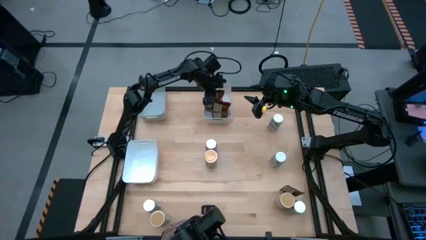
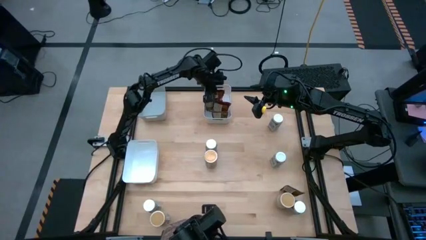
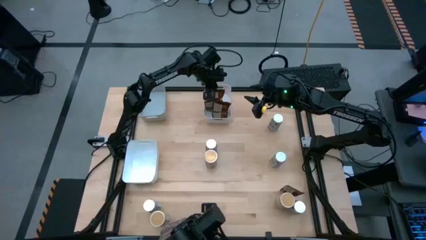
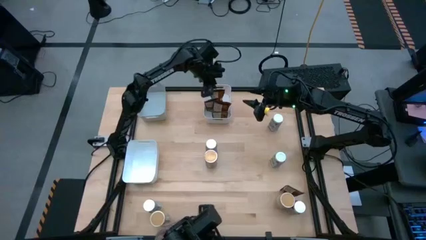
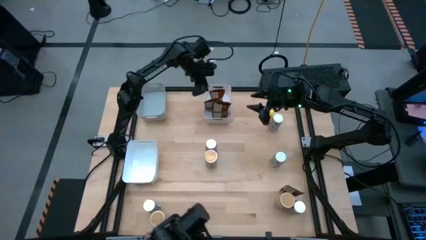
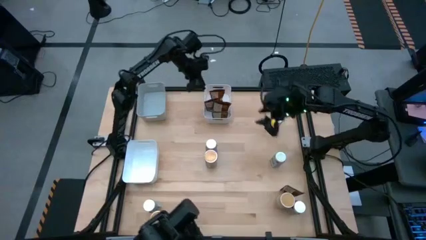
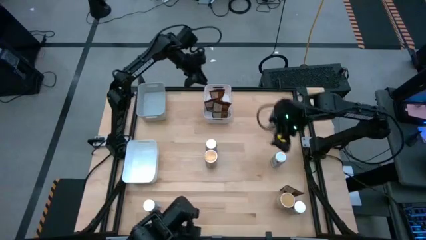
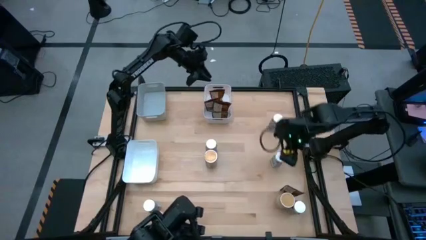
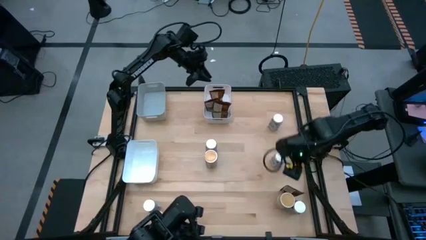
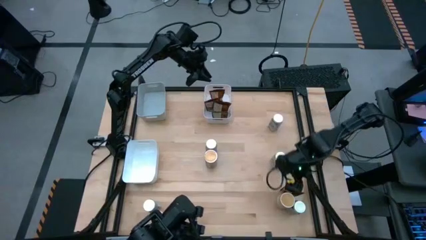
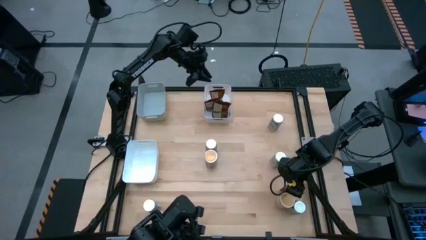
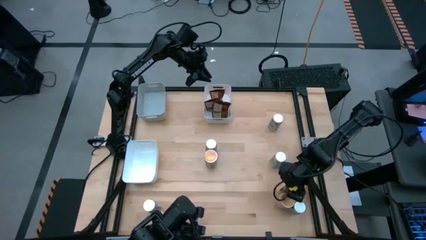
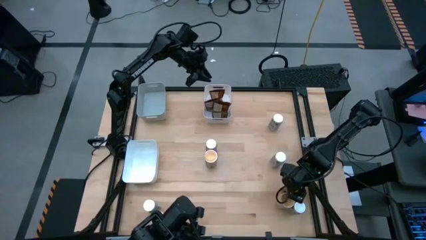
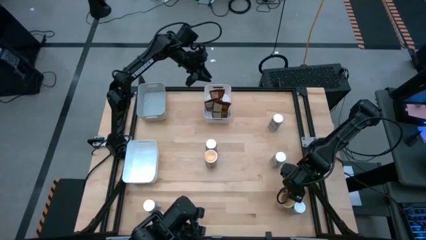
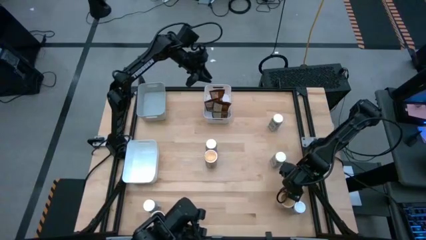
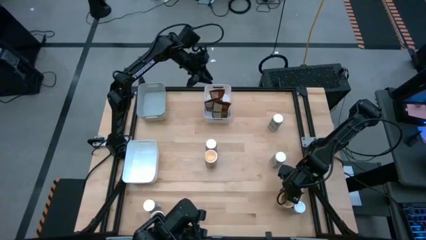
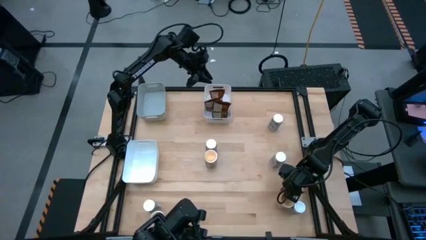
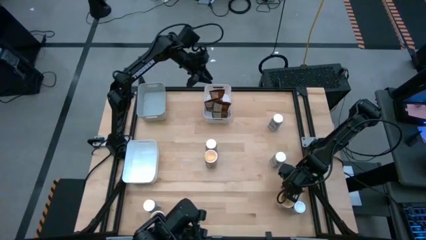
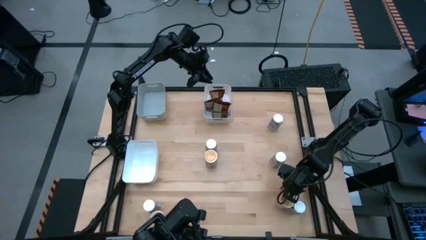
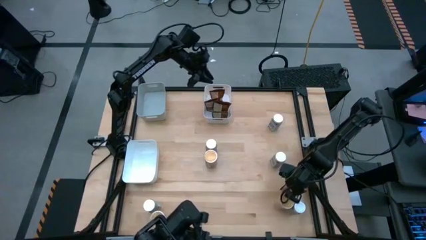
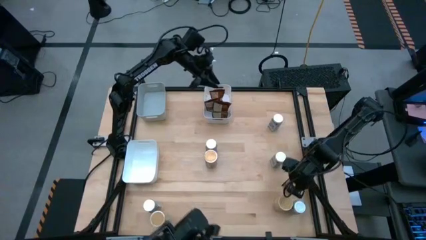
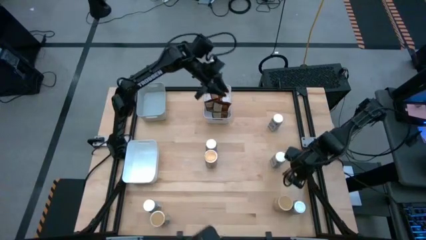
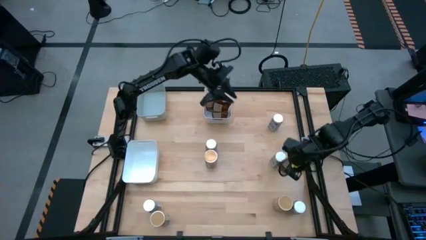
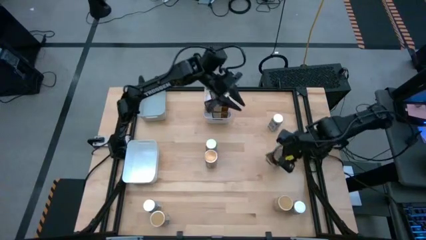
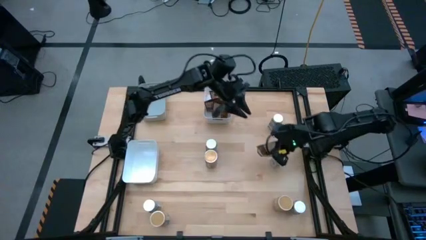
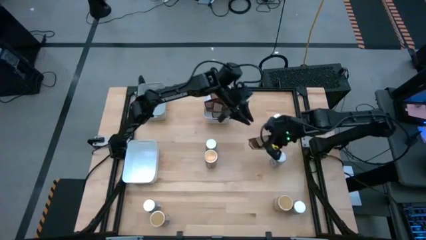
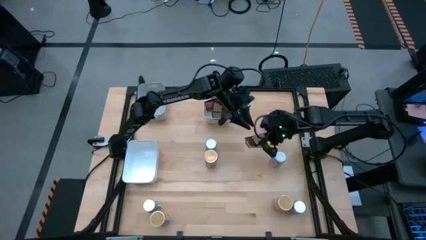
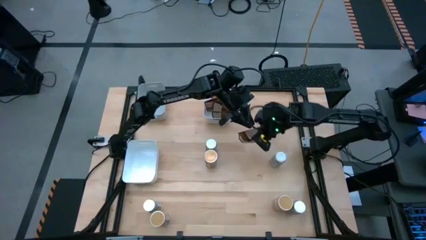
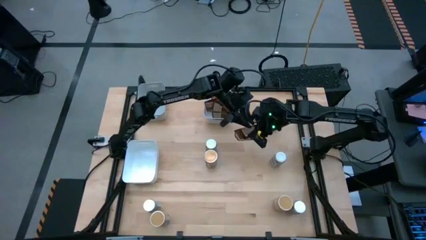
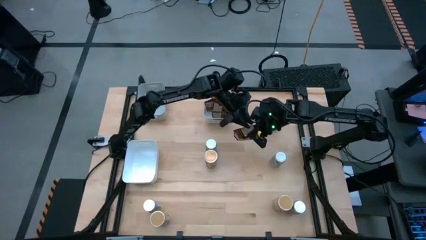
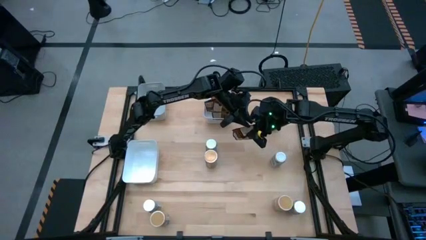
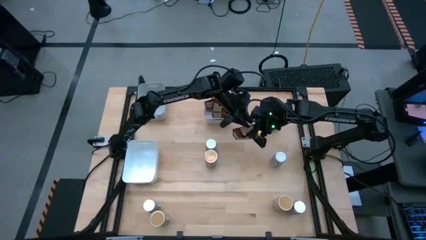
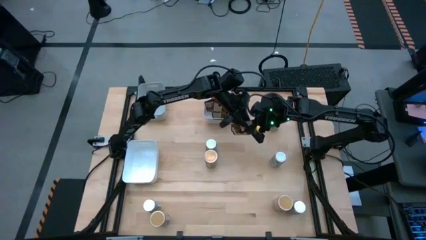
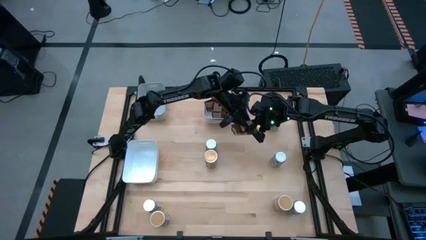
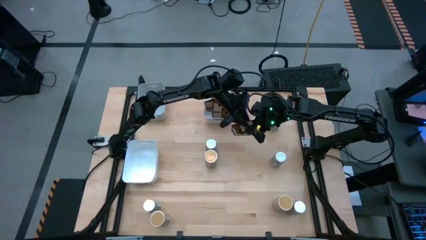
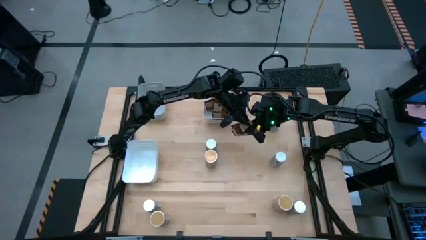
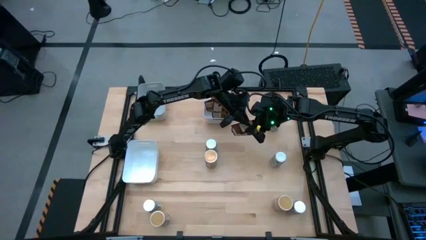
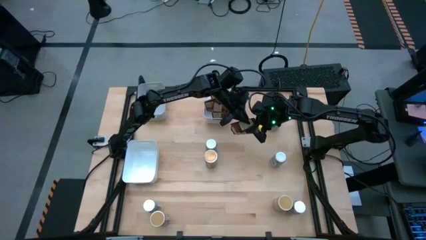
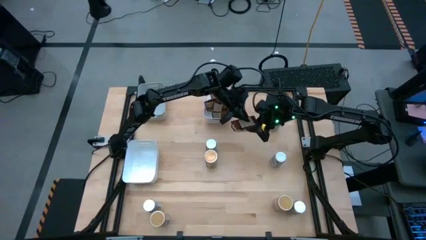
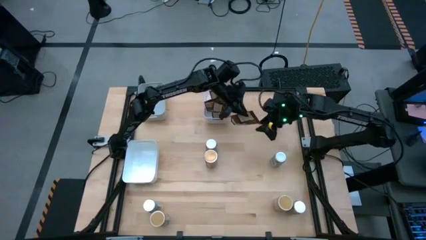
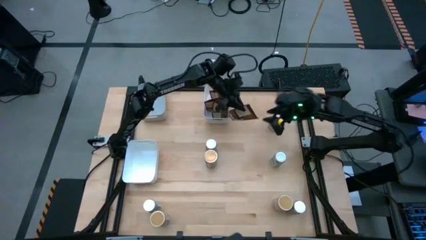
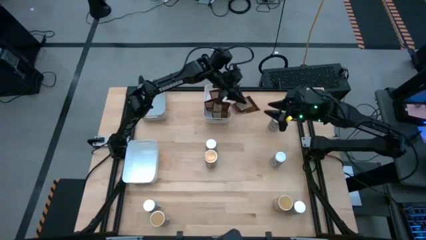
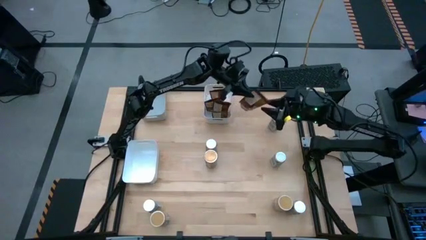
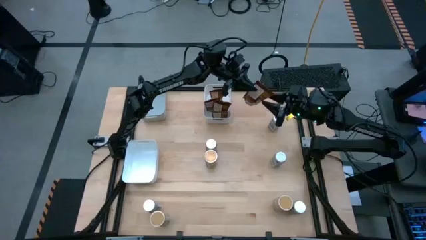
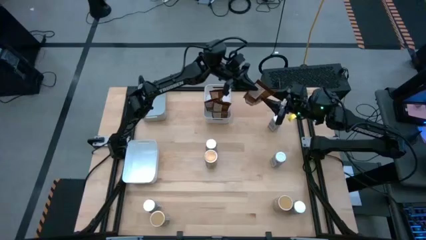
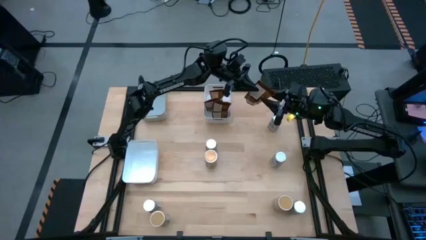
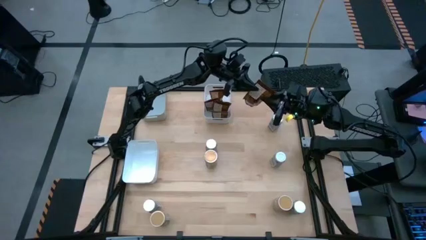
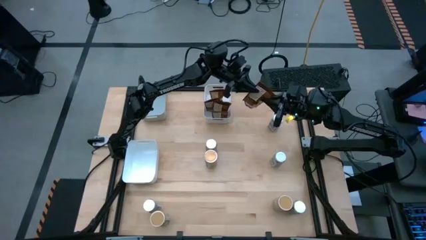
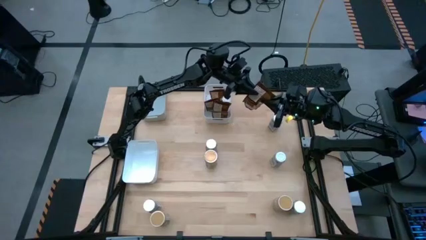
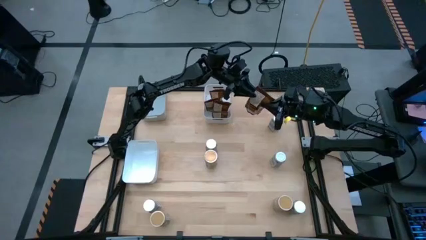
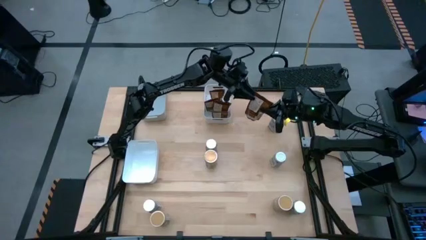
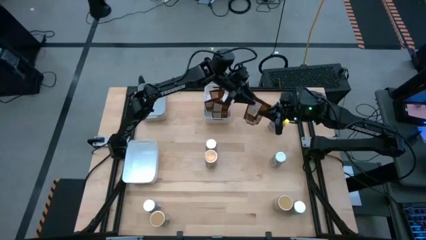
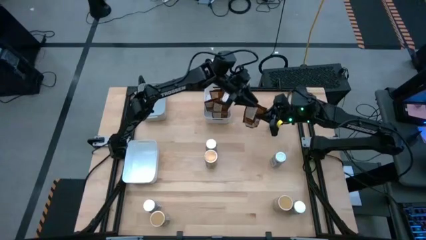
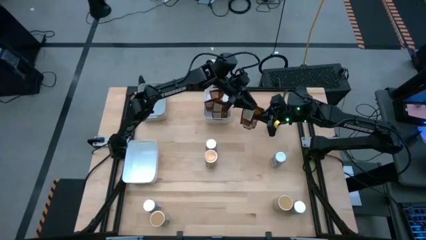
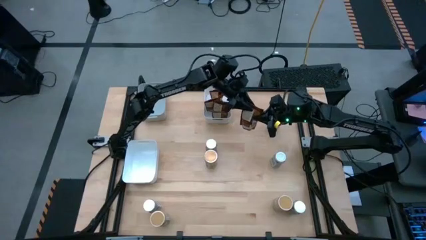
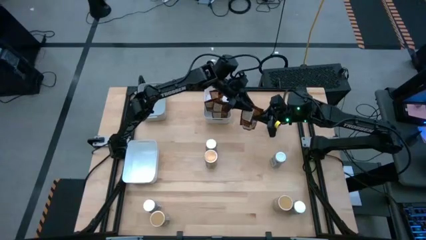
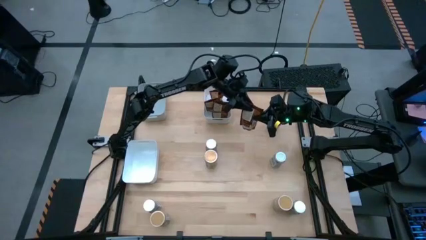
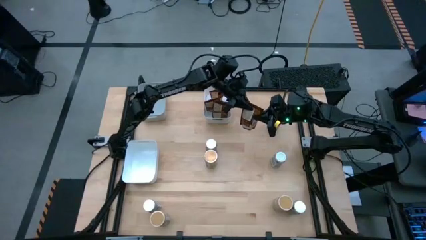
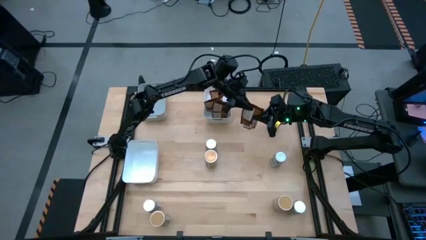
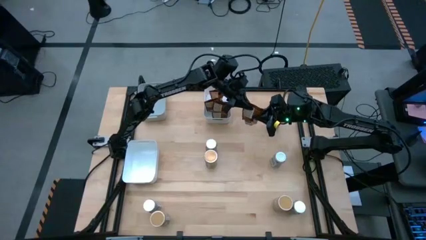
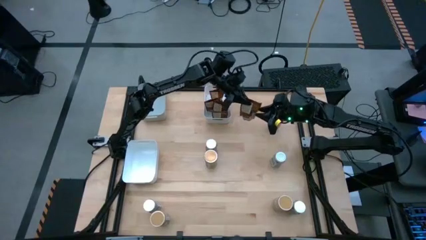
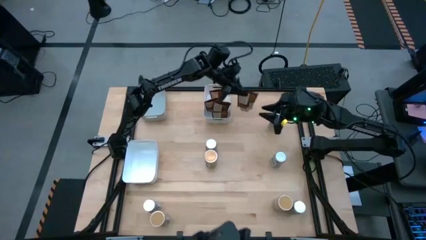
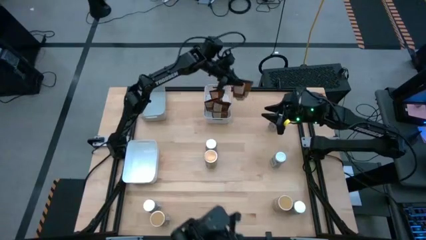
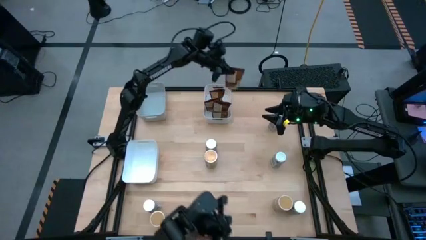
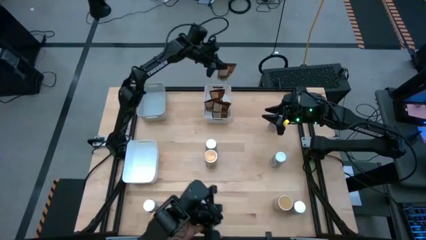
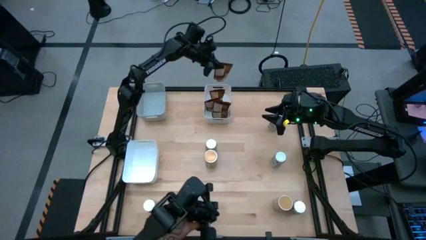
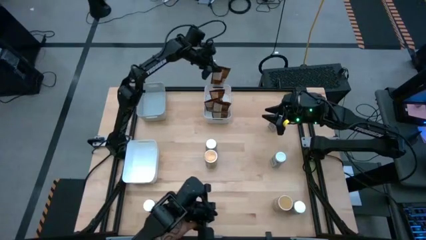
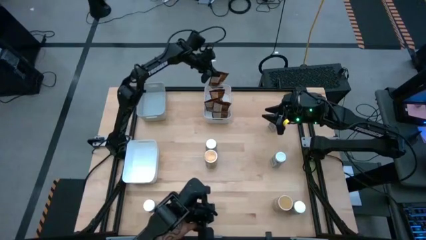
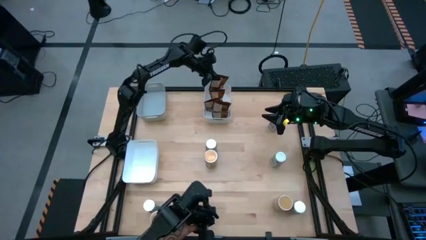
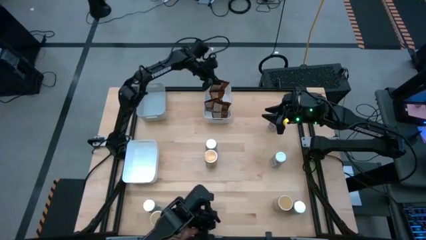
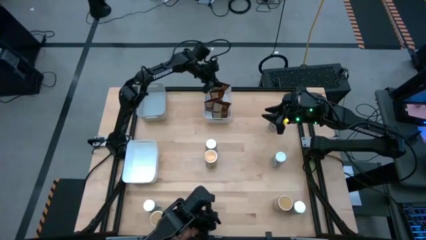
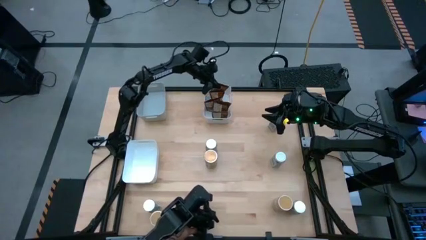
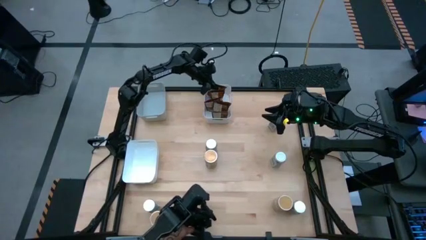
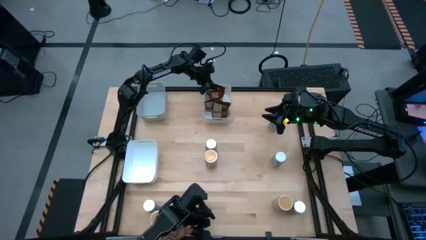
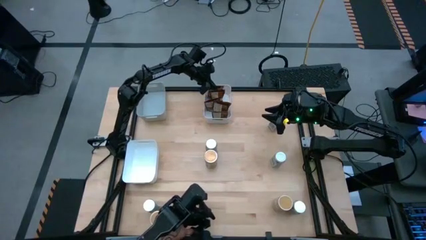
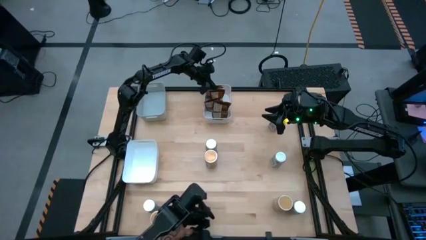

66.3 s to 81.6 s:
Task: Sort spices by type
Put the brown seasoning pack into the top white bin

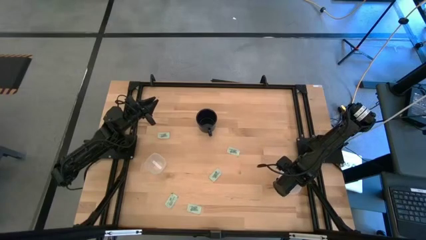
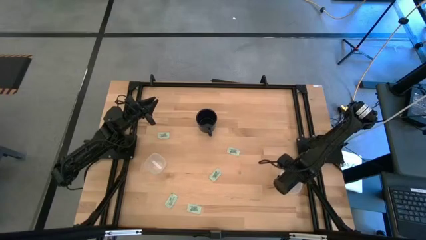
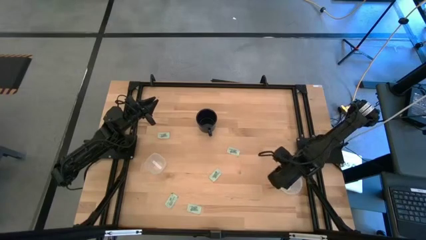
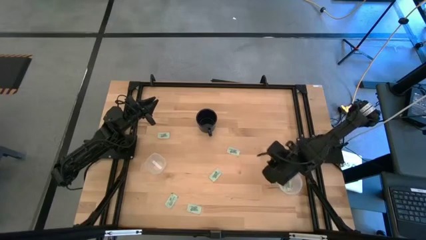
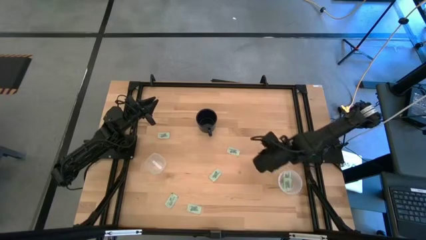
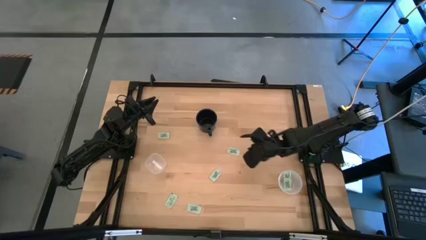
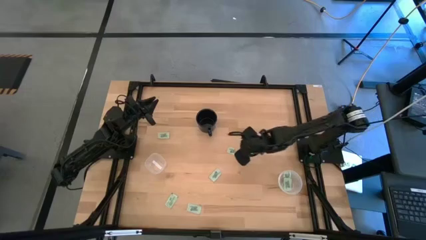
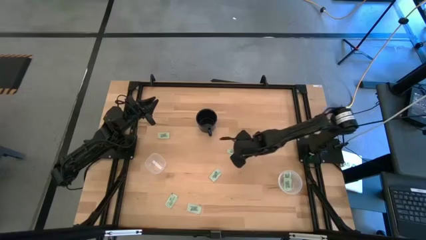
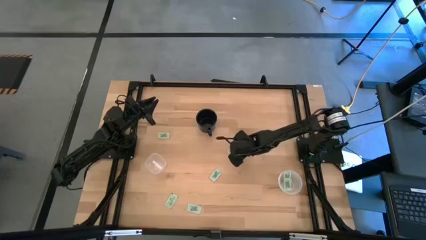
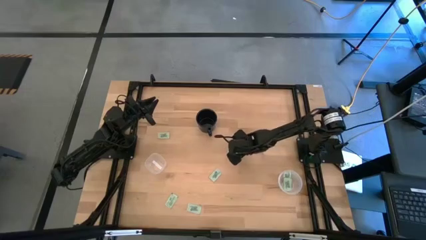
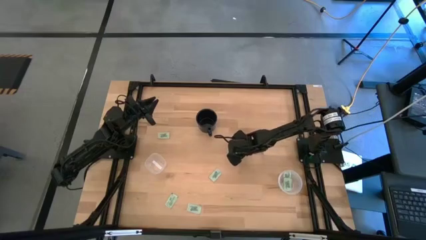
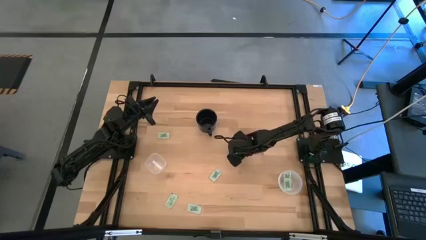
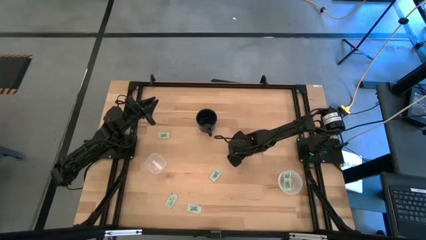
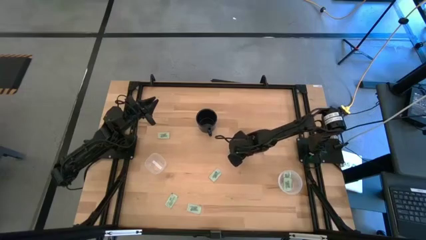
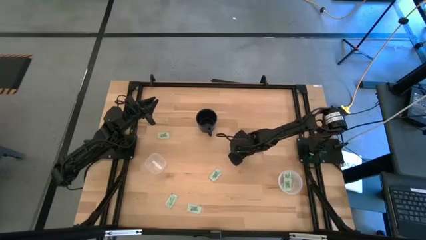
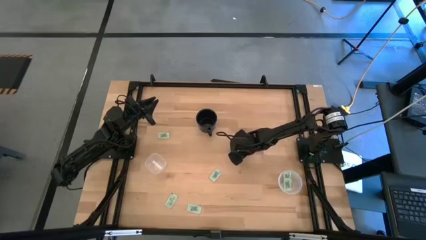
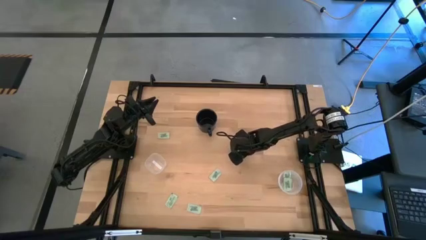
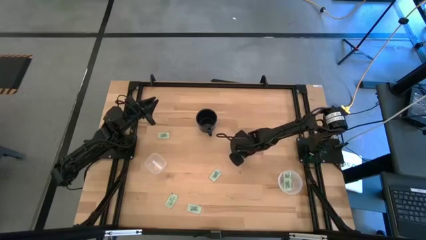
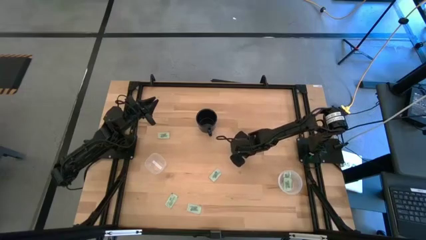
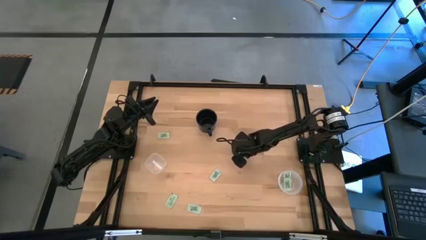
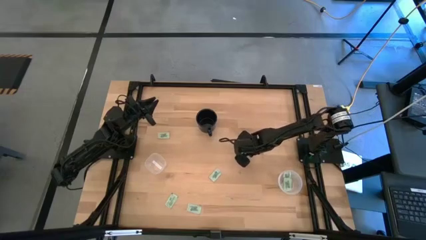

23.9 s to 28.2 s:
Task: Pick and place Stevia / Truvia into bins
Put the stevia packet into the right transparent container
